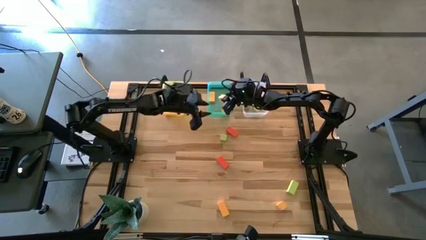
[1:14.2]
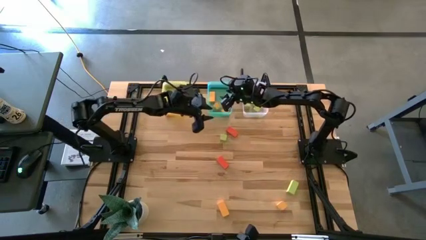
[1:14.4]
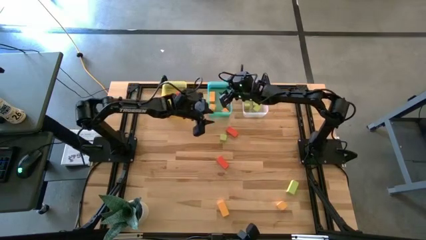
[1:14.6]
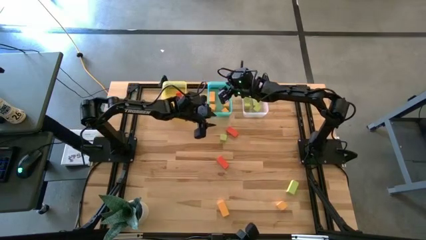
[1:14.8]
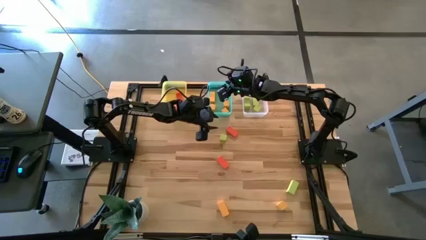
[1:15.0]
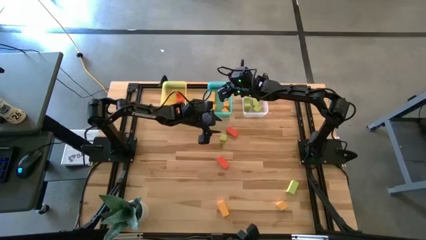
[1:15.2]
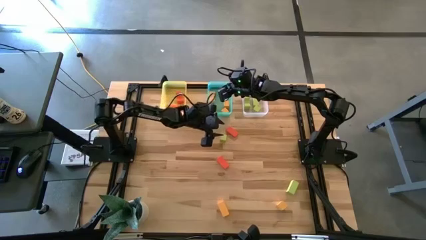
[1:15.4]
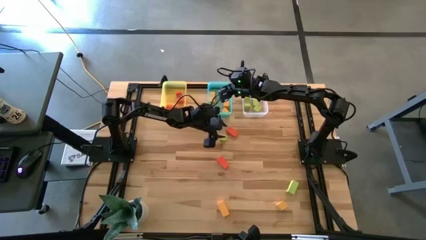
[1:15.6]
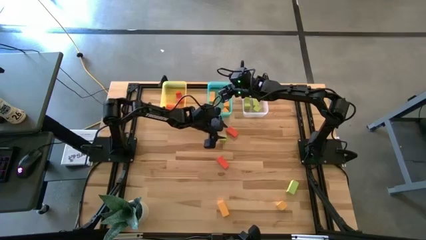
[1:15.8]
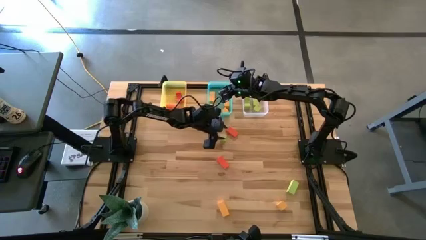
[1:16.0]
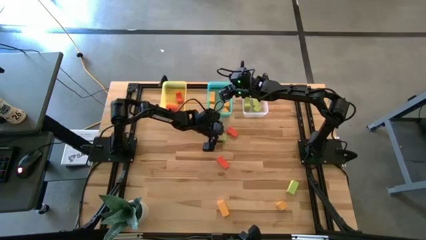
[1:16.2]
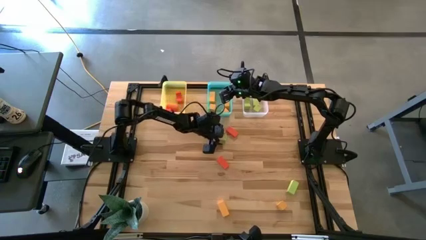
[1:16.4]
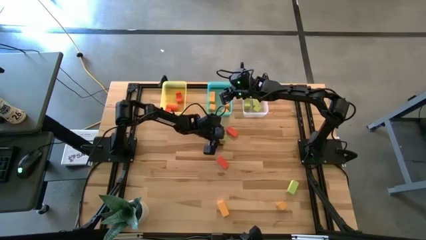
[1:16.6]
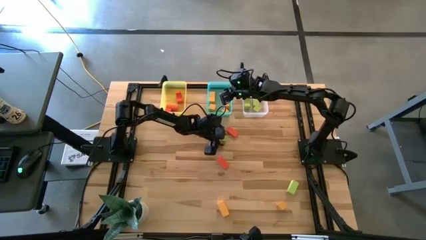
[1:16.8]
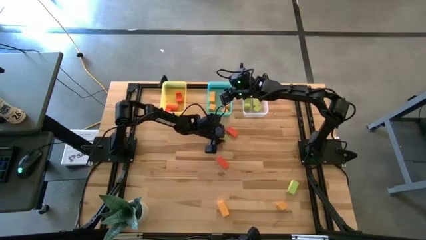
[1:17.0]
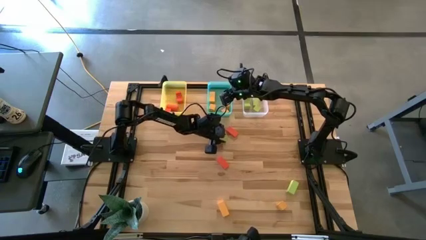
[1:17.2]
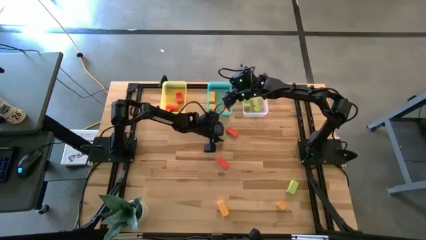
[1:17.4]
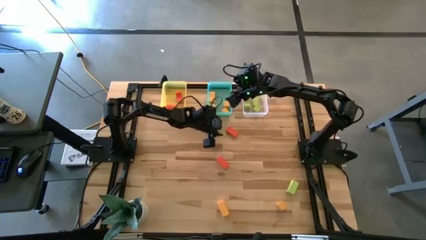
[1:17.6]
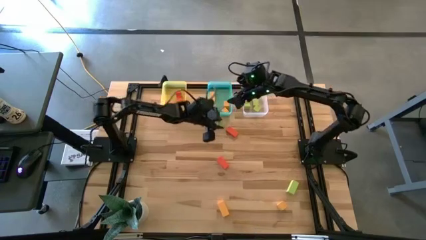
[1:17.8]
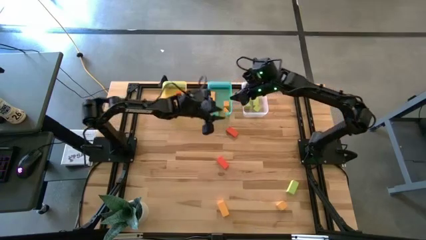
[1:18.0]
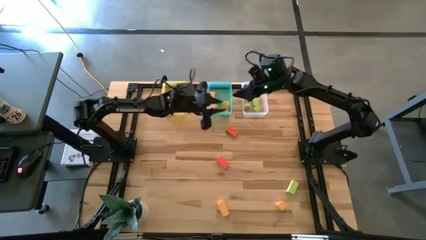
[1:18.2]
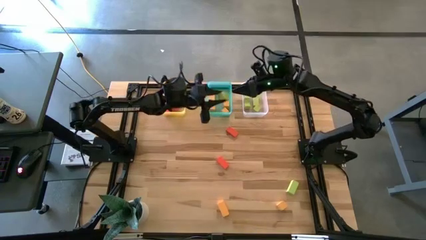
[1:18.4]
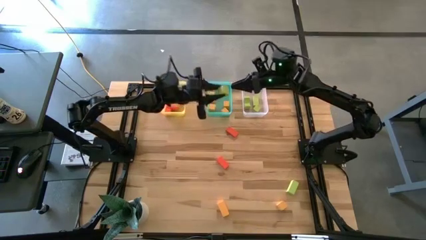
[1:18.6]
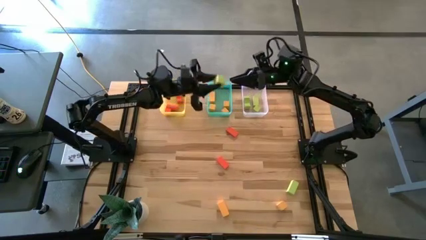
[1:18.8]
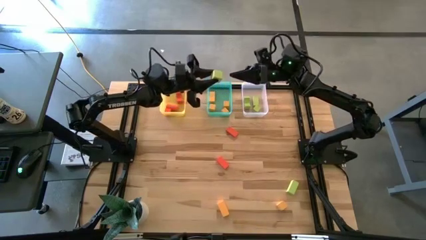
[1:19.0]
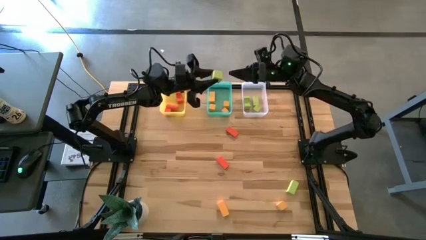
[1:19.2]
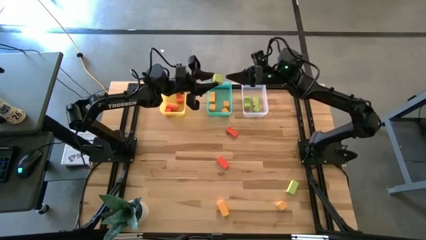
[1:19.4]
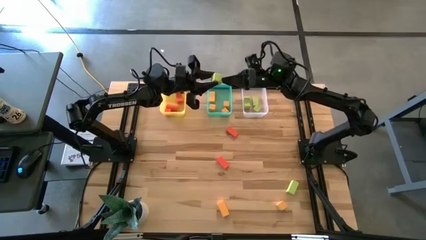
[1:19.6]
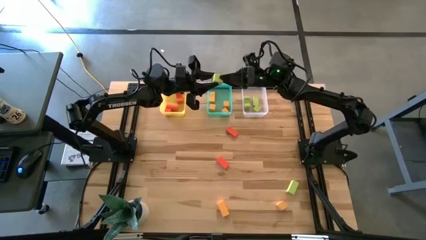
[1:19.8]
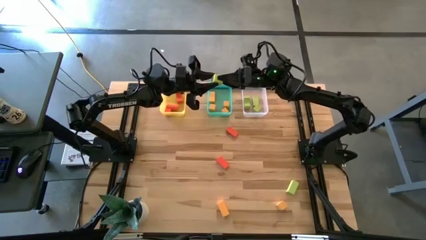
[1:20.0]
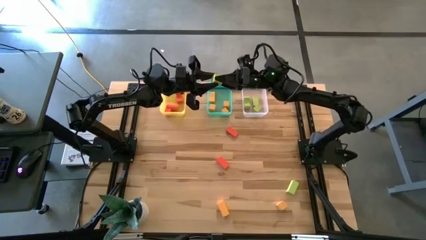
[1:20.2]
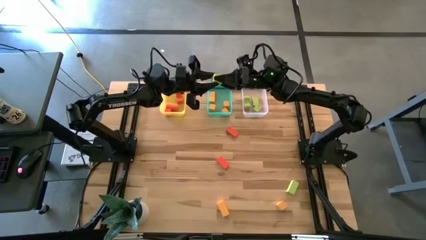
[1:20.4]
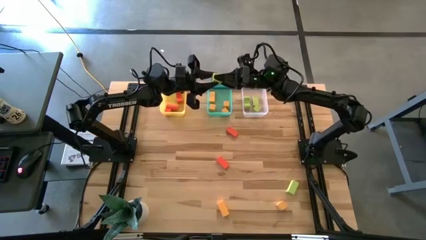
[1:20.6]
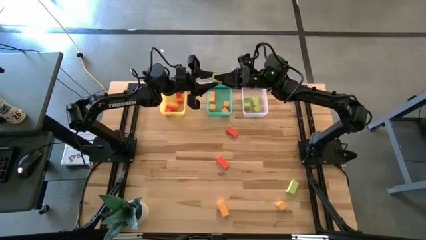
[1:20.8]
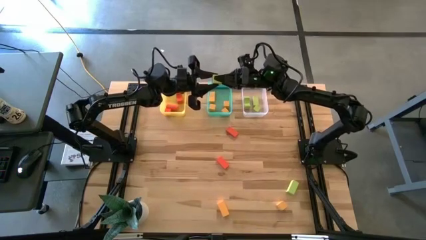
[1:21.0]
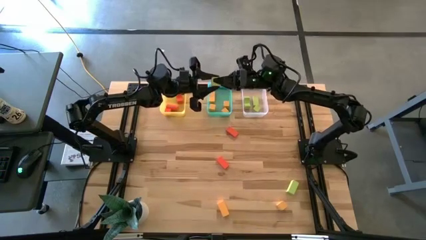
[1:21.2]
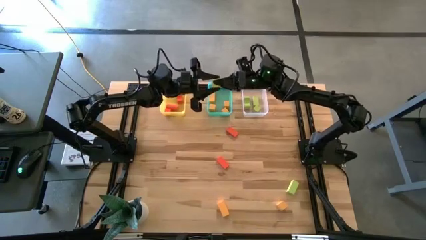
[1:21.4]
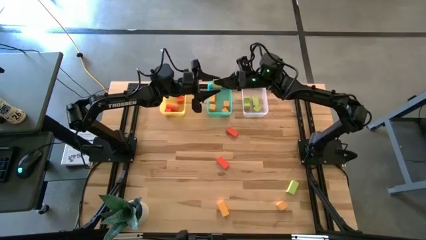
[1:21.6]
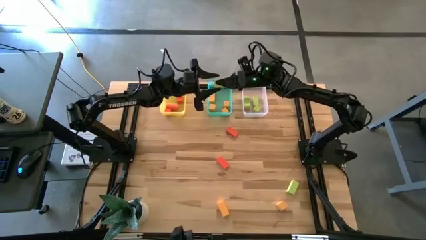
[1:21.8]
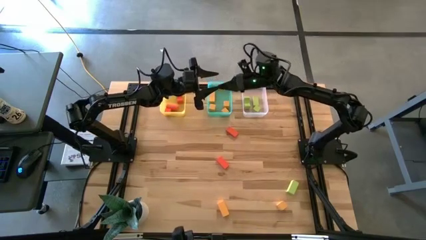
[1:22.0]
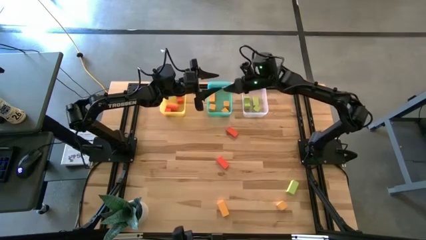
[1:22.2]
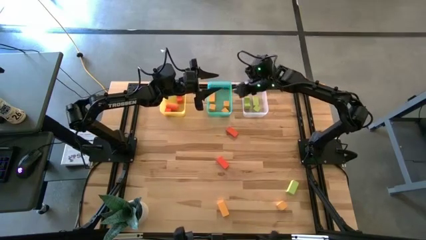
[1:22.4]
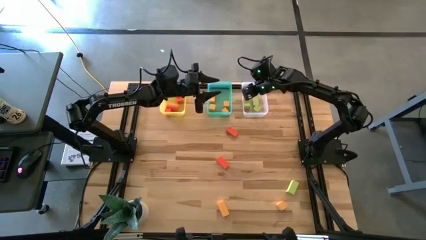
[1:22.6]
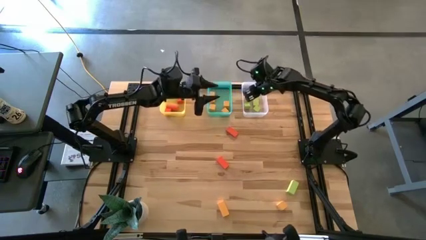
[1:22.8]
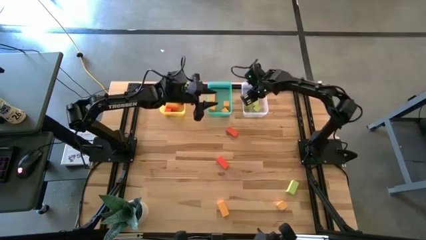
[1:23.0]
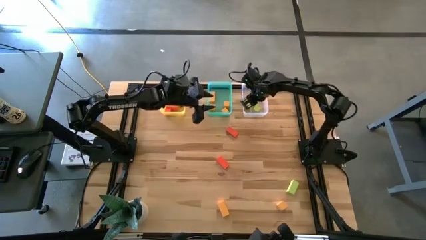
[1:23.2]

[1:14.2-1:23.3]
Task: Sort & place blocks by color
Put the green block into the transparent bin

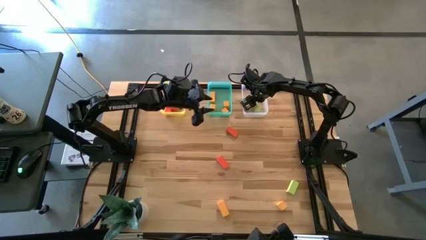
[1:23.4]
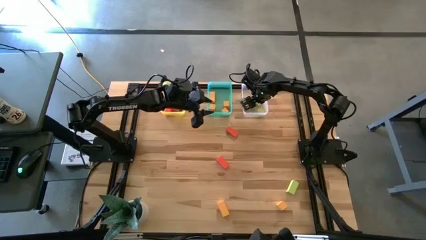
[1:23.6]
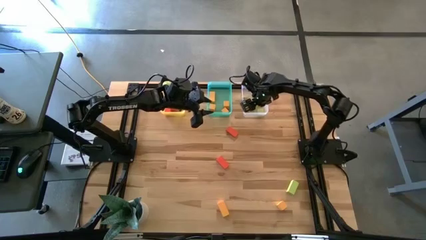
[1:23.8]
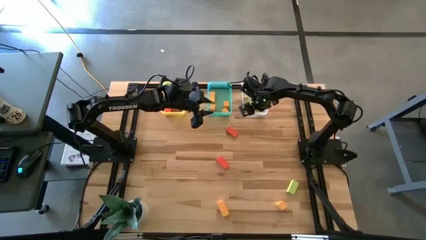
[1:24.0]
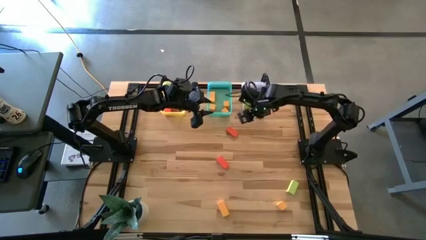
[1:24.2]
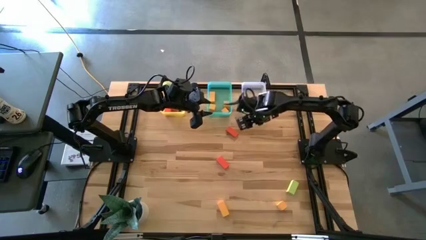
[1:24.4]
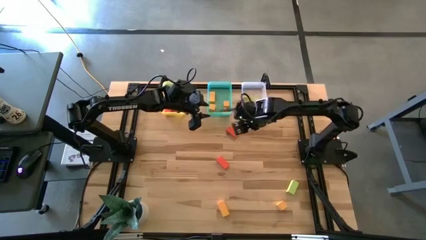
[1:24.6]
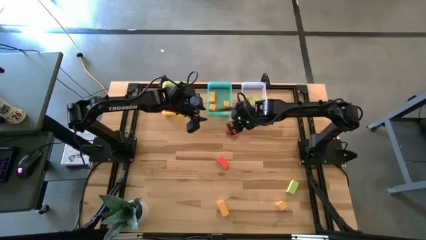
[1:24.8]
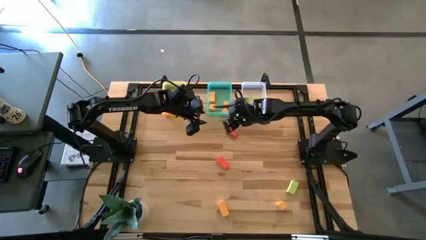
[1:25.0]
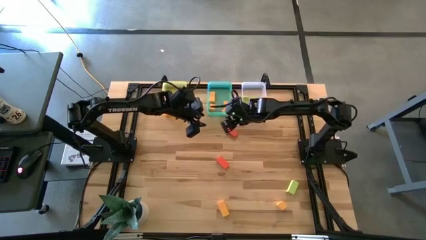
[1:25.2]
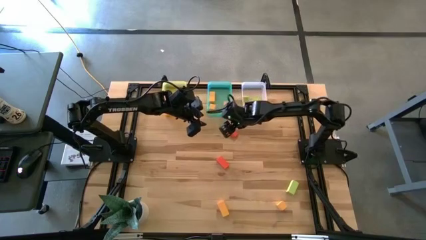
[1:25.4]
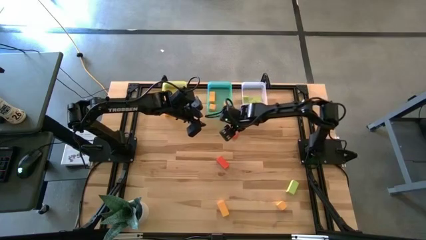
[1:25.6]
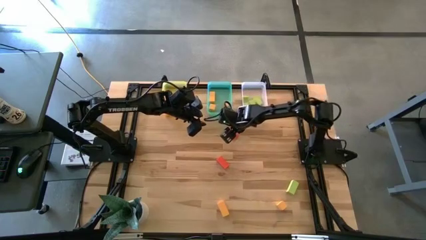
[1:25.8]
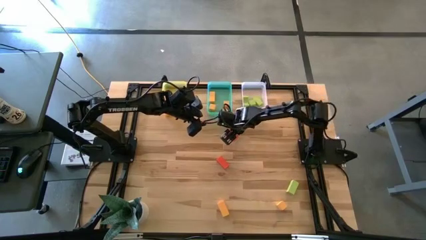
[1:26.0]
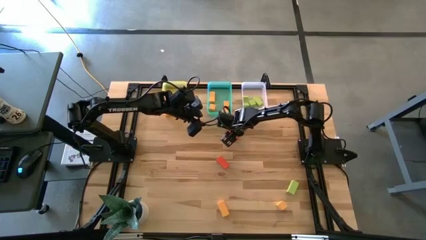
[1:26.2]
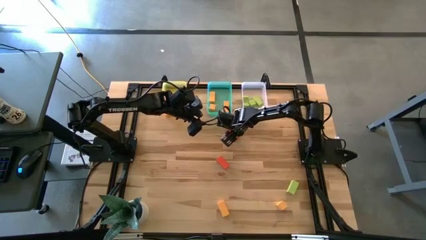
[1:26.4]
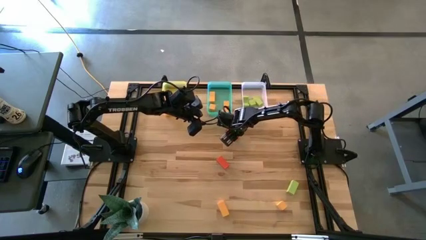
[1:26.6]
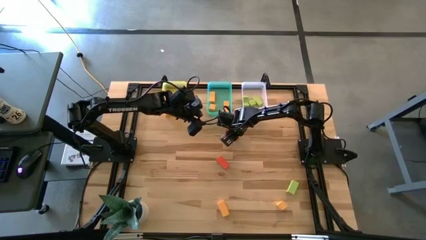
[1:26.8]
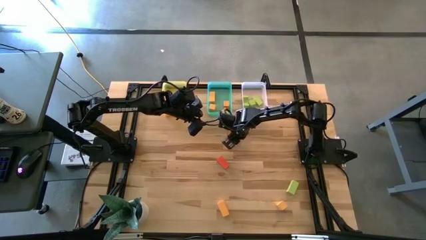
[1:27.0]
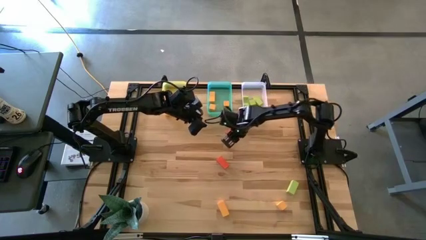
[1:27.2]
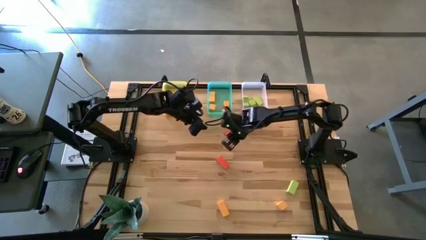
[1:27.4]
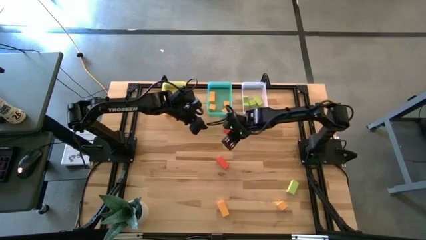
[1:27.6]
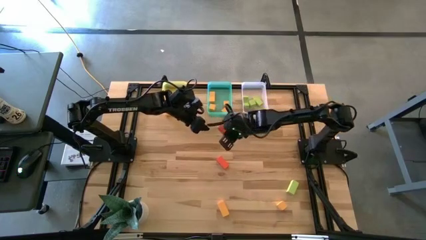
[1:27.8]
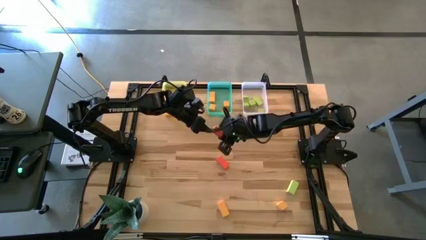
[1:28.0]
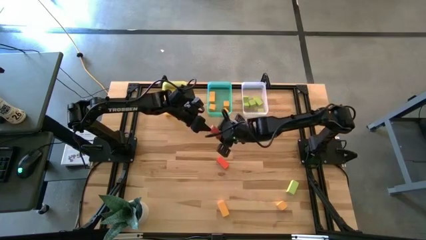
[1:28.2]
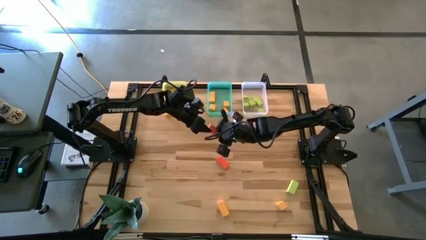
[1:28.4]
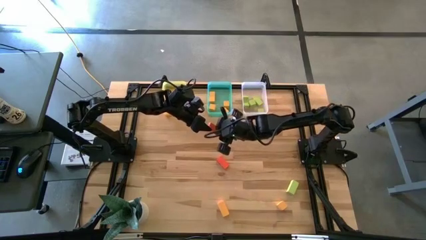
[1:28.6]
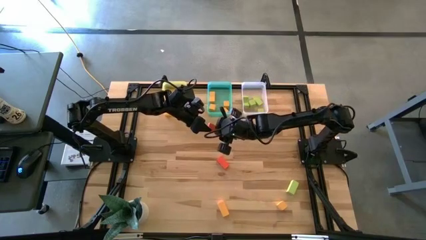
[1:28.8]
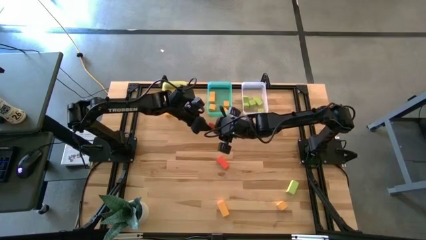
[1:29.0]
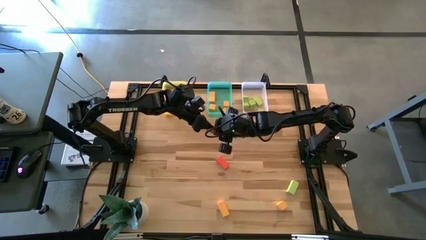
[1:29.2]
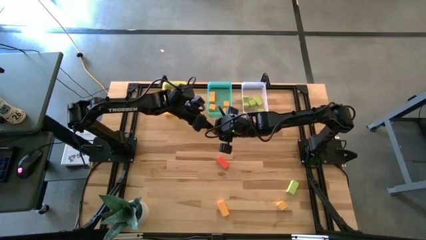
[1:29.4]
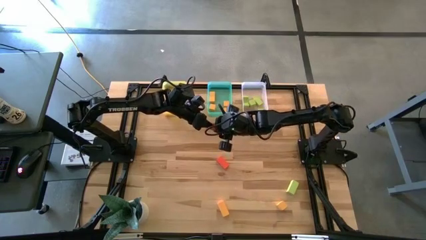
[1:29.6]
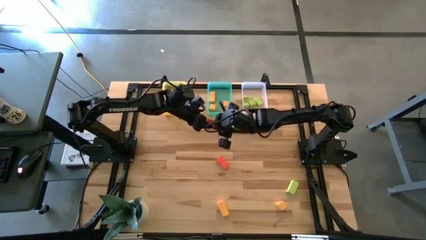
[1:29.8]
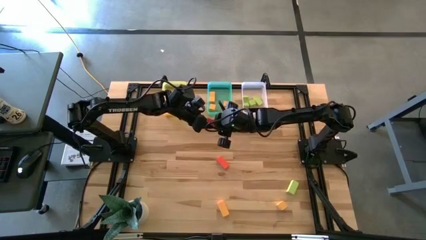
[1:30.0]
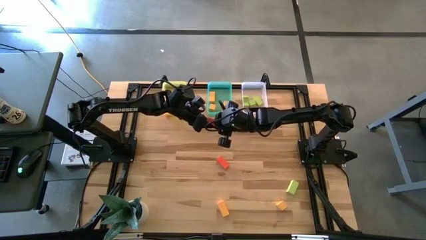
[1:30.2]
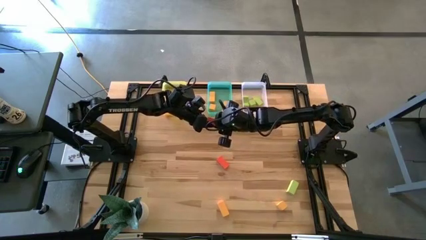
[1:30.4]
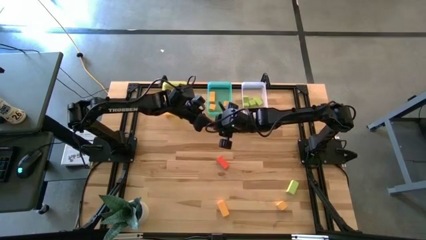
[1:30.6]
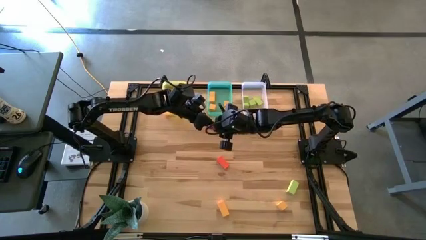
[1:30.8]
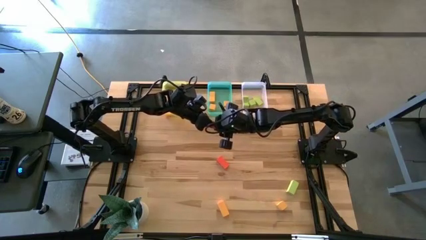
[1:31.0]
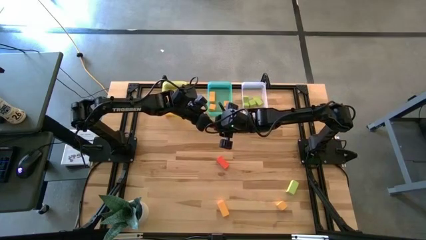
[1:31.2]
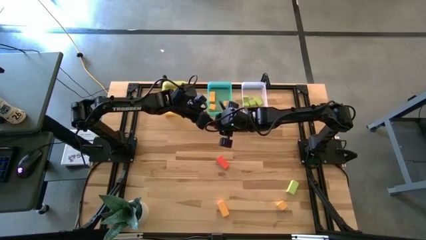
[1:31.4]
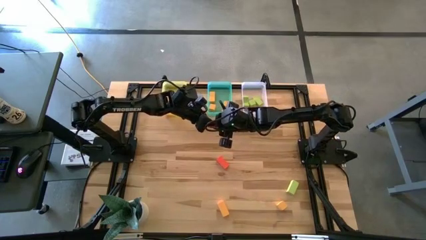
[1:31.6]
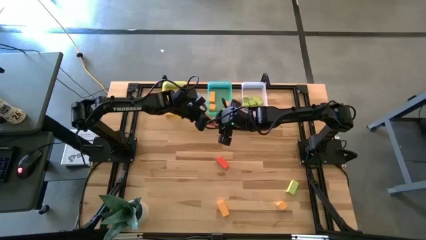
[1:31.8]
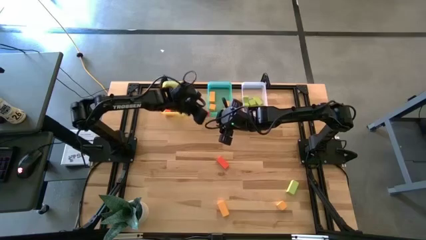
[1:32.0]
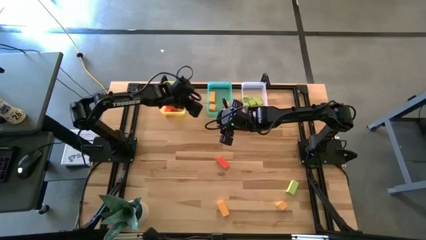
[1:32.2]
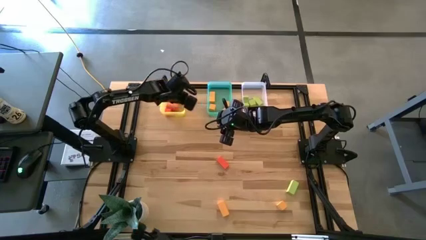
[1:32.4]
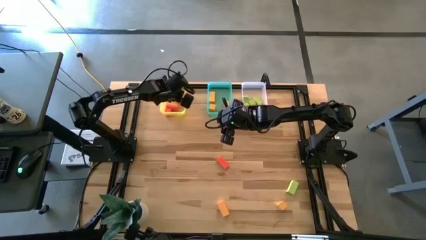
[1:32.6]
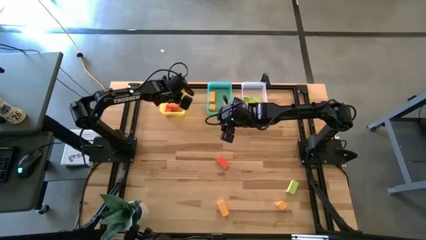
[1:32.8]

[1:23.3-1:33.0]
Put the orange block into the yellow bin
